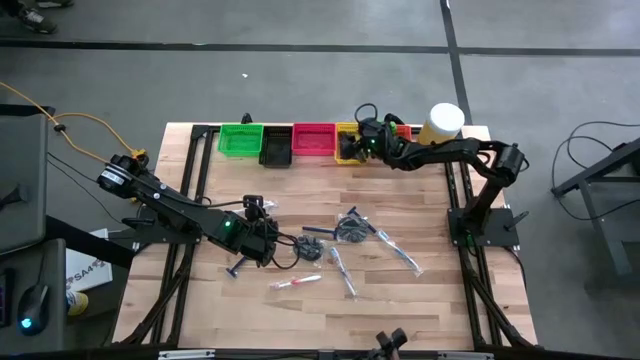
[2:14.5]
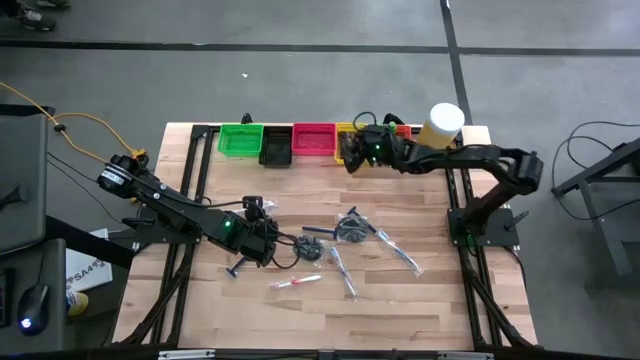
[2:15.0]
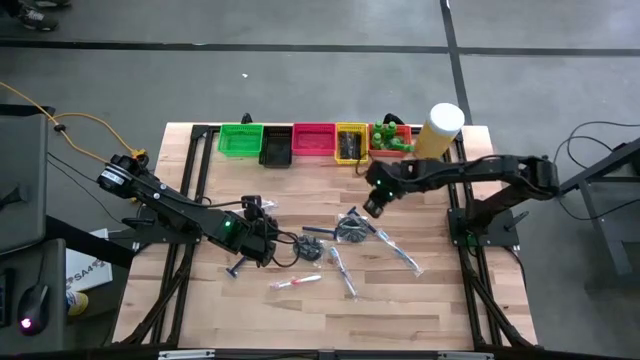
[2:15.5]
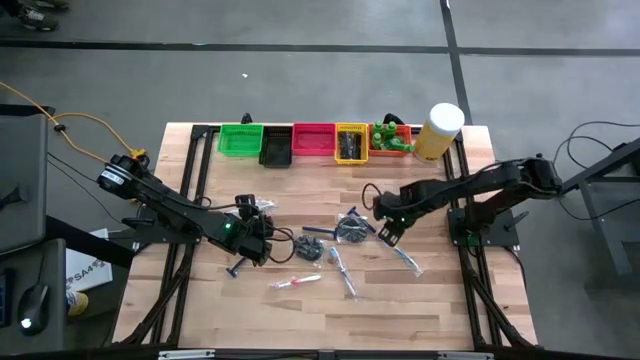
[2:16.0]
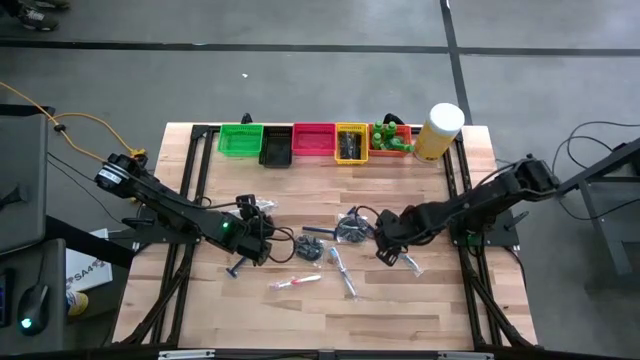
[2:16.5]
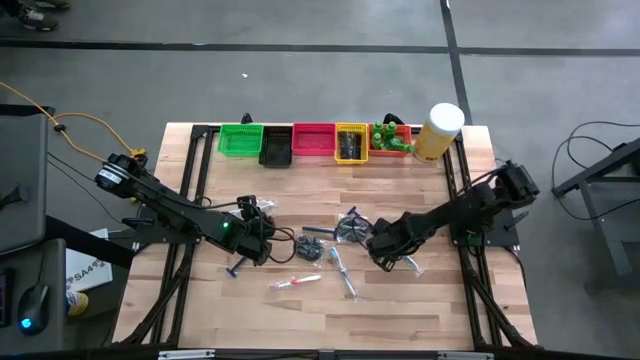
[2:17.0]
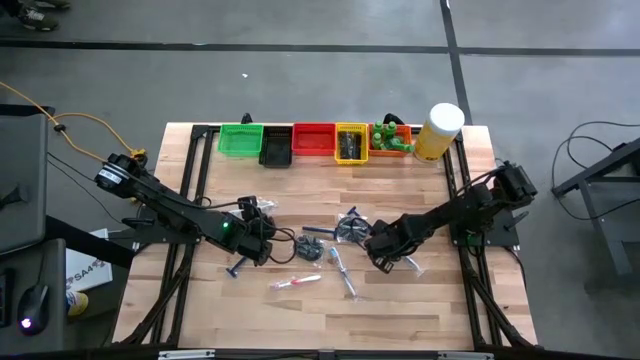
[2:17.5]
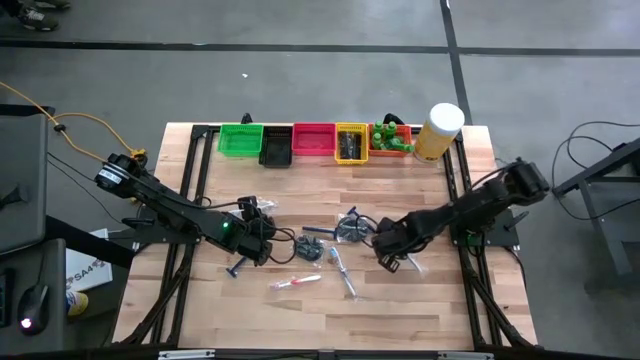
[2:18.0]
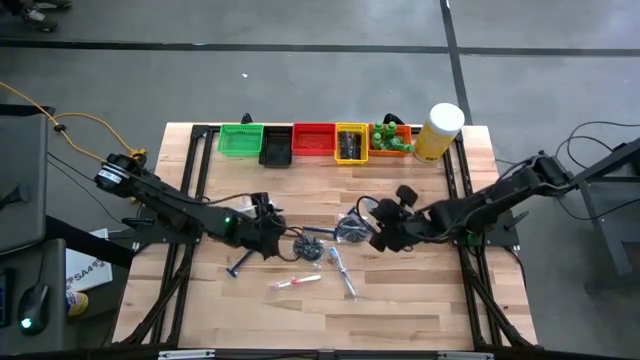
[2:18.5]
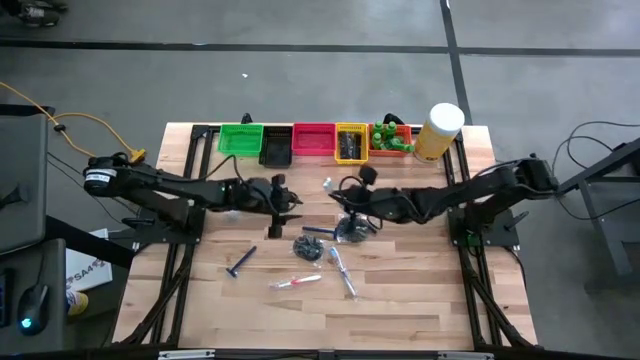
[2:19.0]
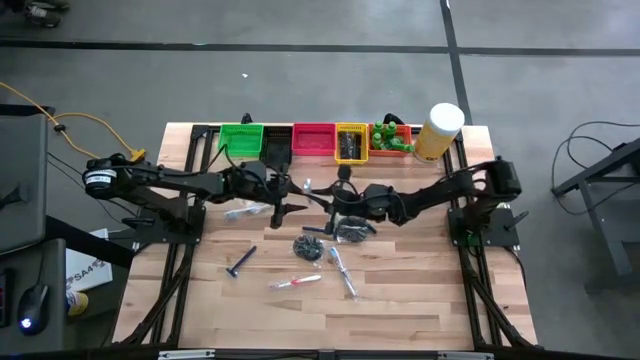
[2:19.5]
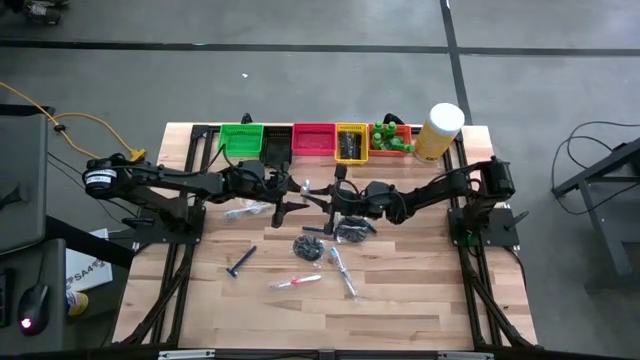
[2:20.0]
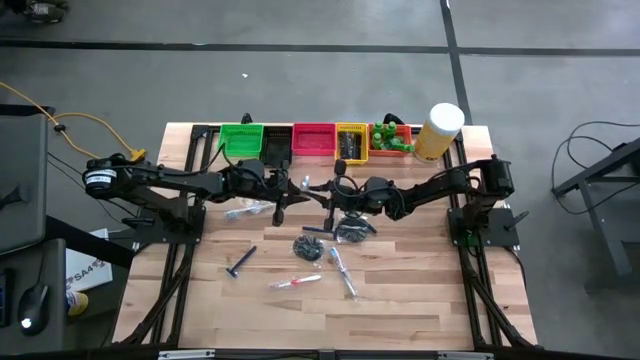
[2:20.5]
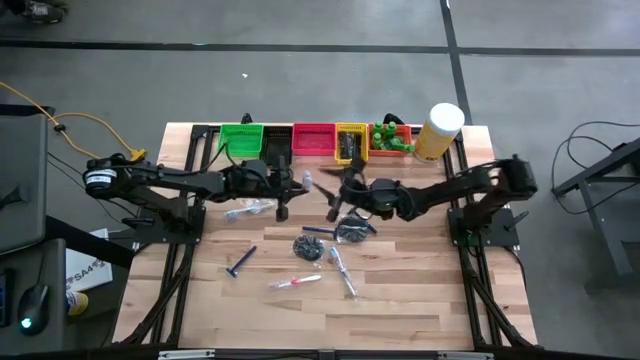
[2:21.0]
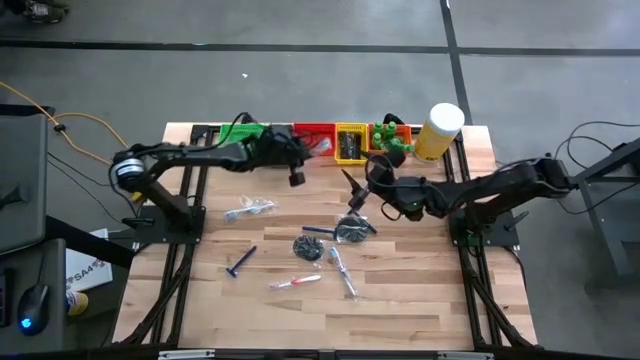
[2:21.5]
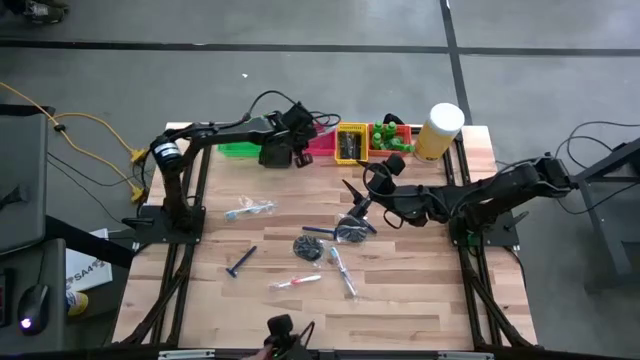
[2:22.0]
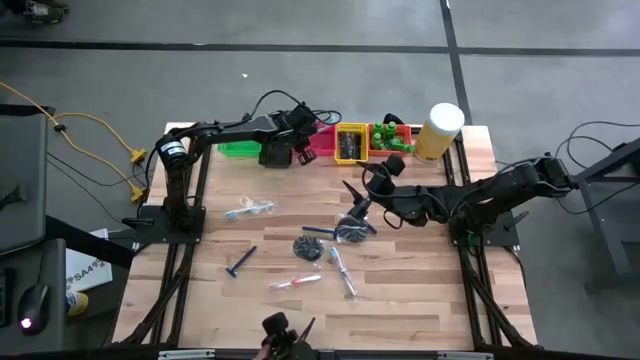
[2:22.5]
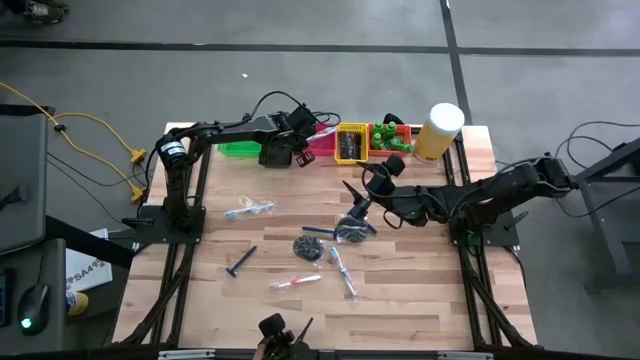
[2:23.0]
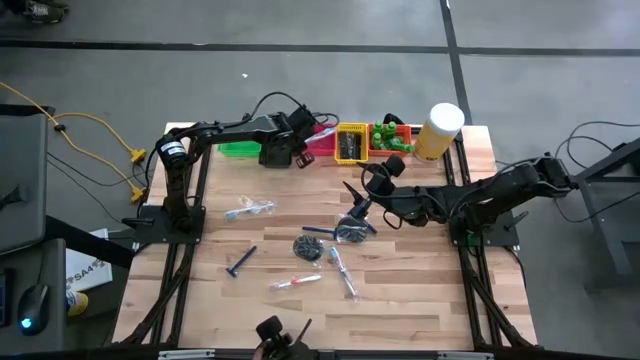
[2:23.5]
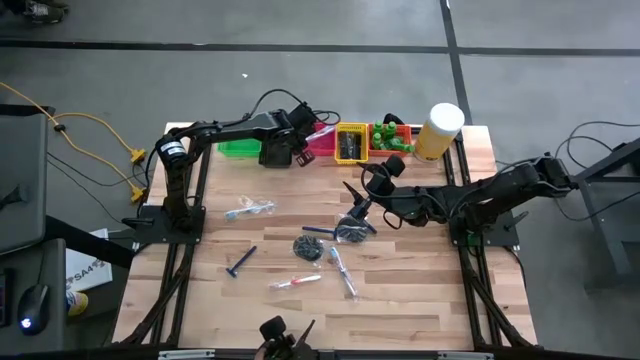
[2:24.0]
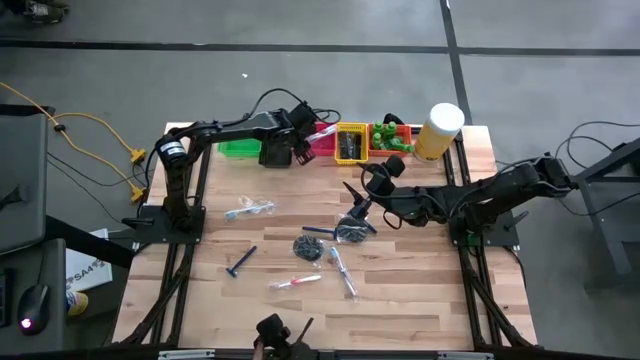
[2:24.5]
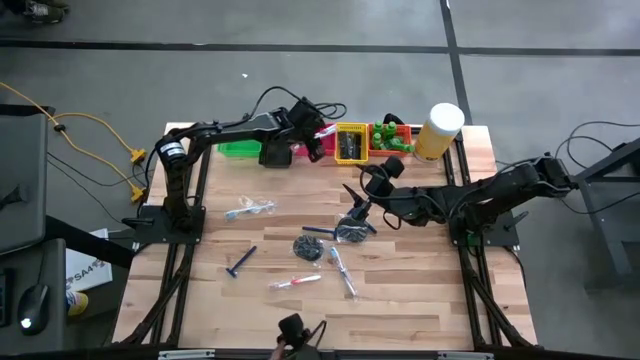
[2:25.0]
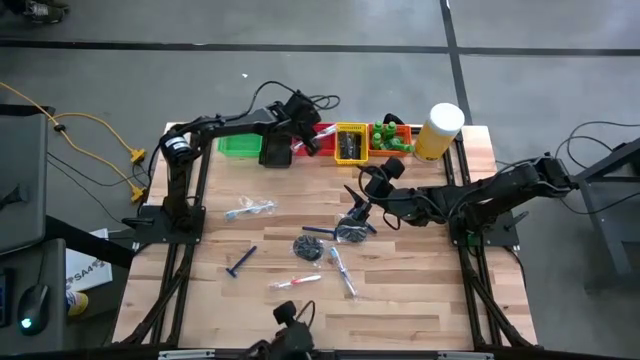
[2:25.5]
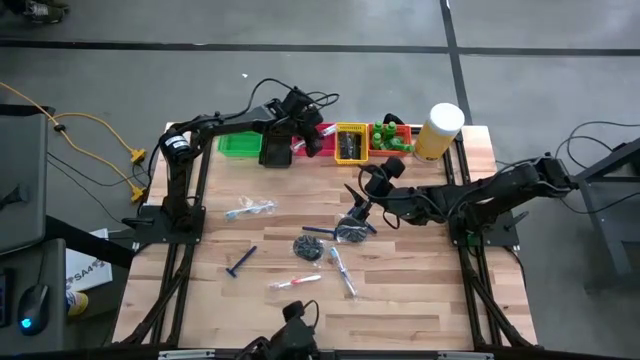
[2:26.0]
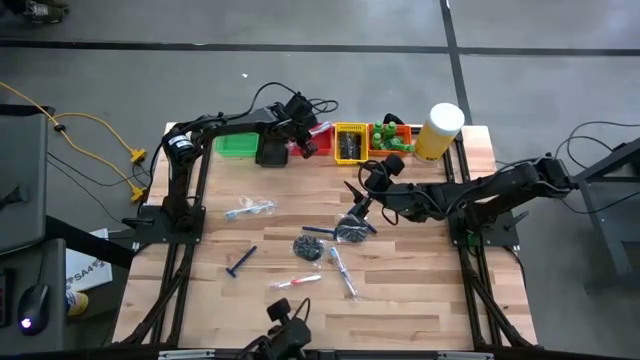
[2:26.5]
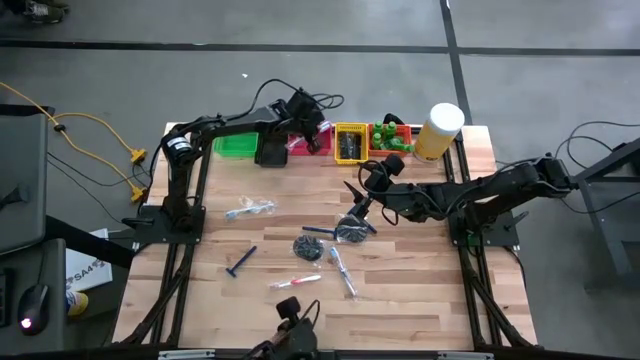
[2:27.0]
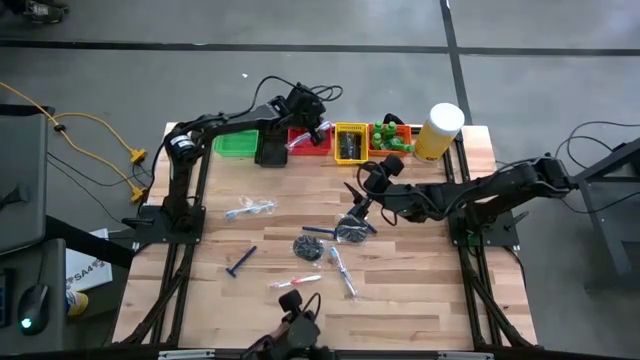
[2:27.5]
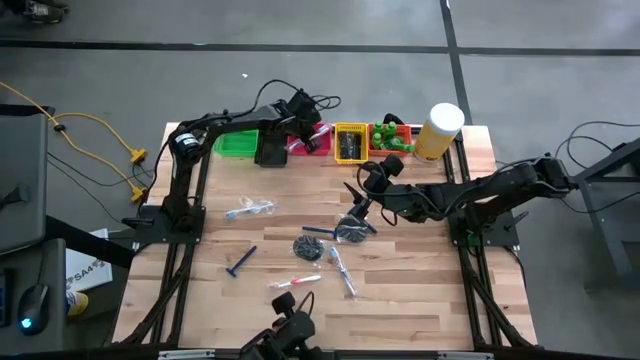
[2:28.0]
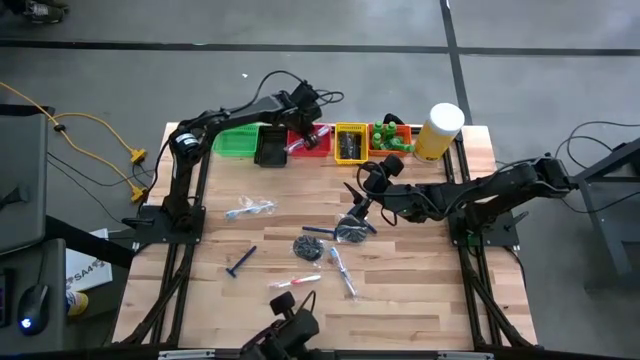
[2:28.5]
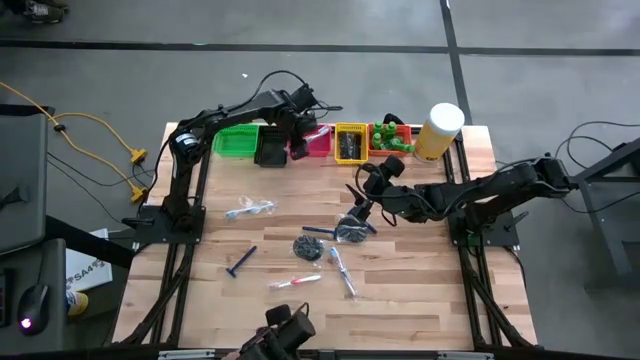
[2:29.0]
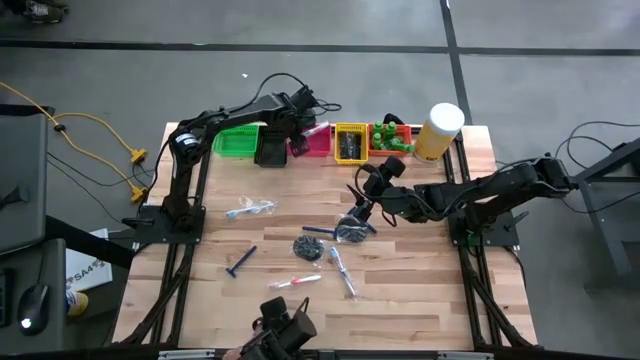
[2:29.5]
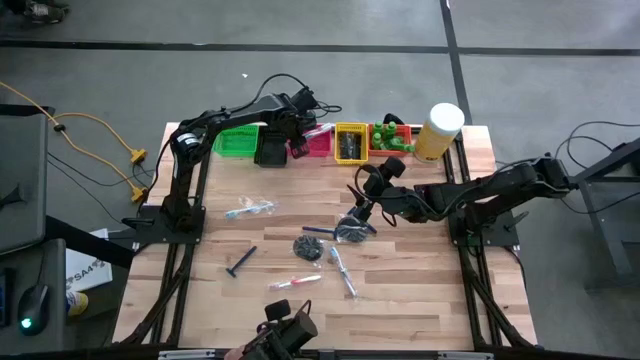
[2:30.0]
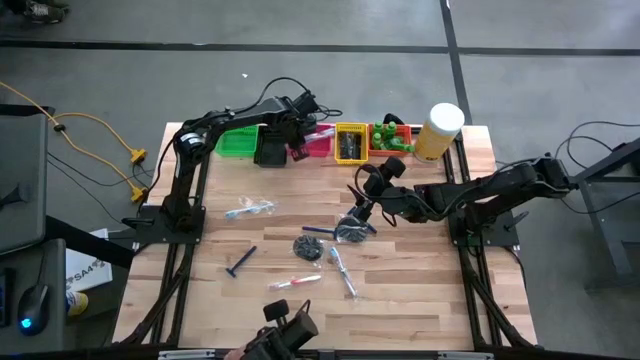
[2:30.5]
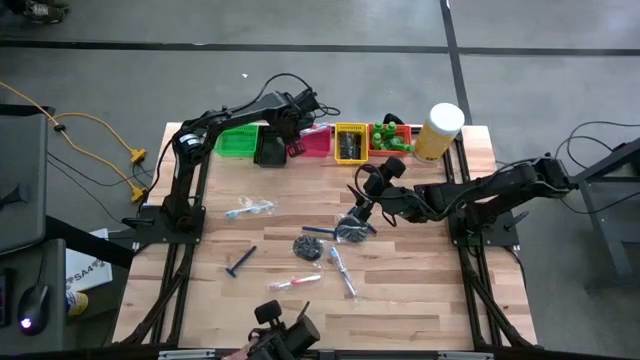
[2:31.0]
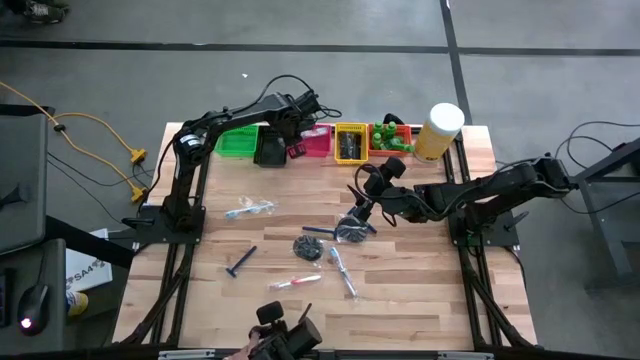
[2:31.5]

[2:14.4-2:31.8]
Task: Pick & Place Travel size toiletries
Put the blue toothbrush into the red basket

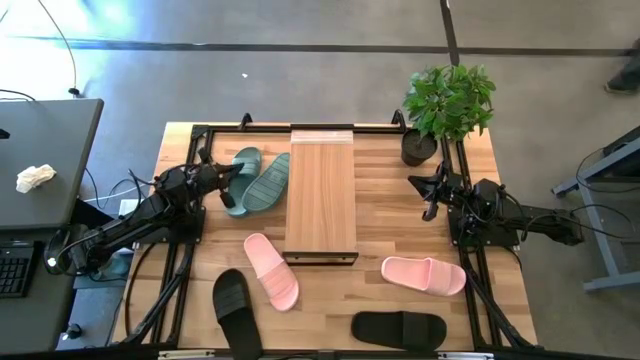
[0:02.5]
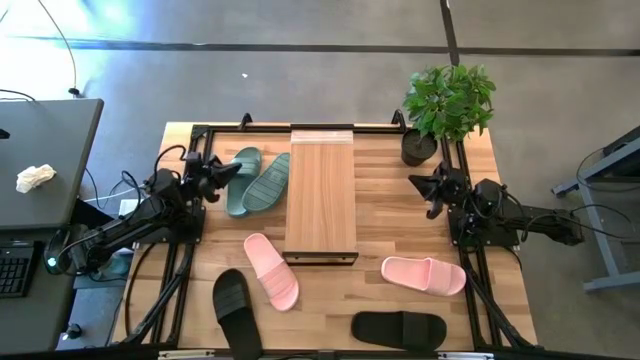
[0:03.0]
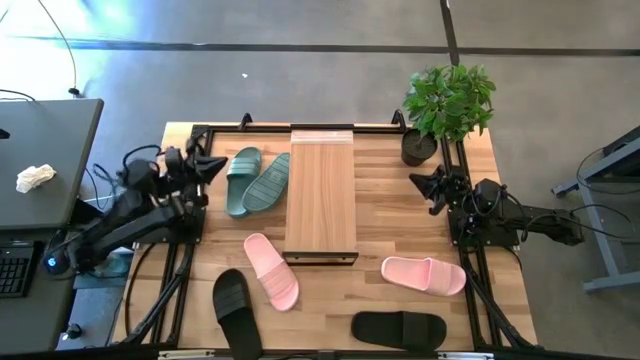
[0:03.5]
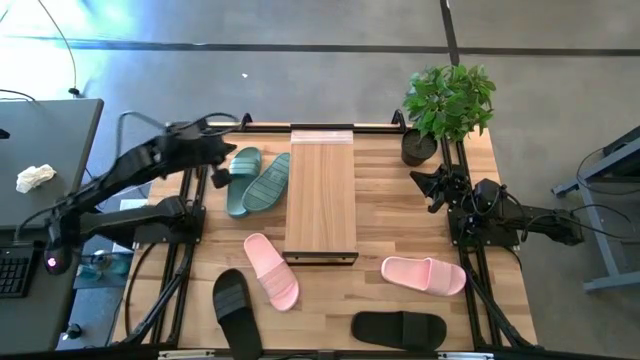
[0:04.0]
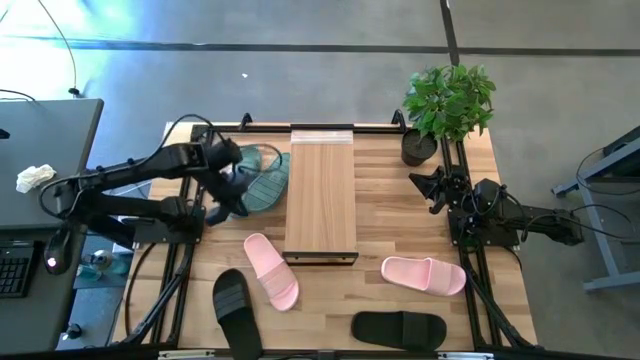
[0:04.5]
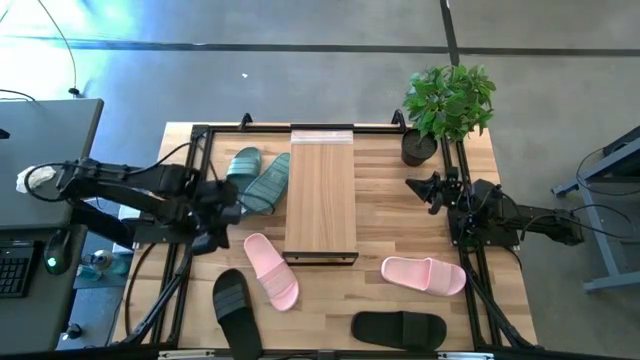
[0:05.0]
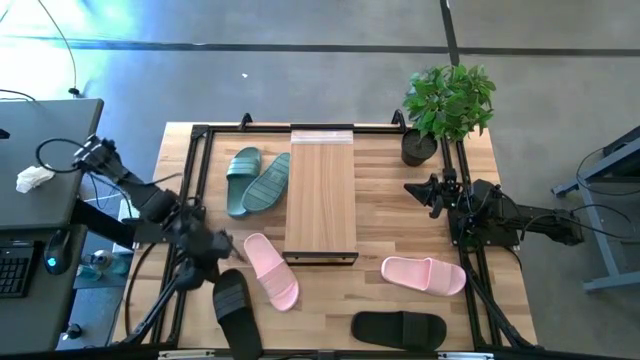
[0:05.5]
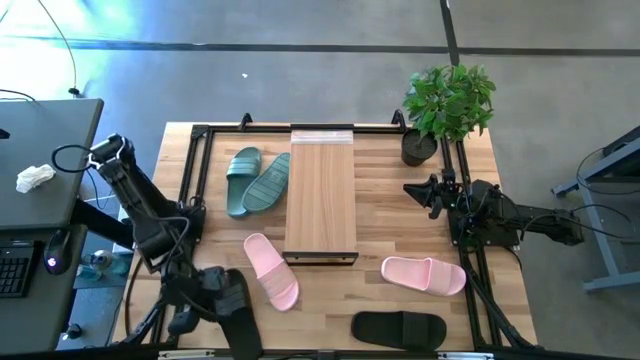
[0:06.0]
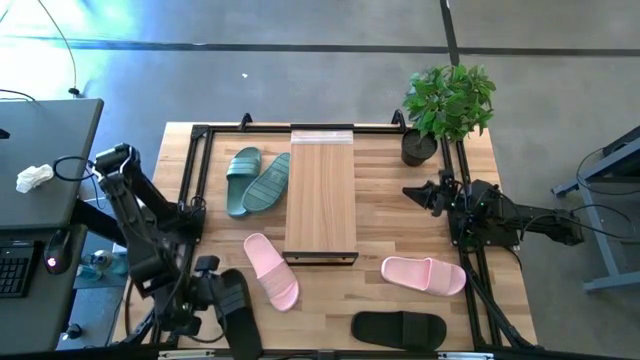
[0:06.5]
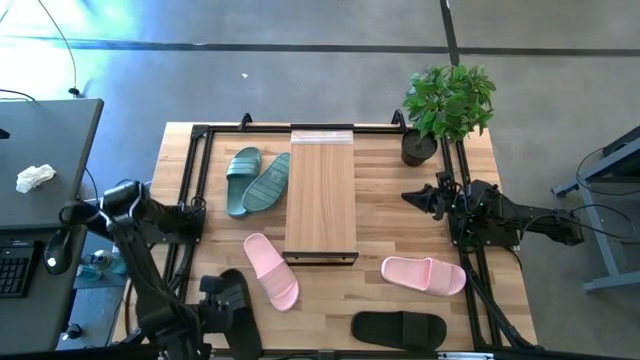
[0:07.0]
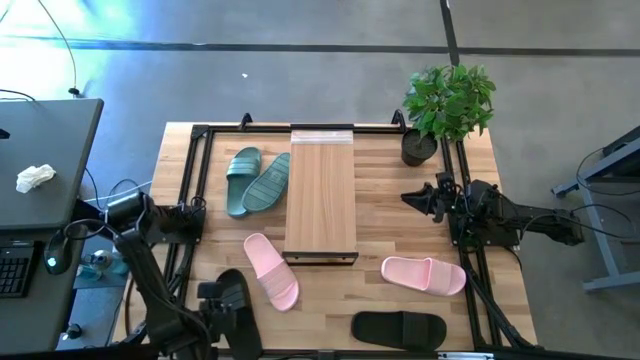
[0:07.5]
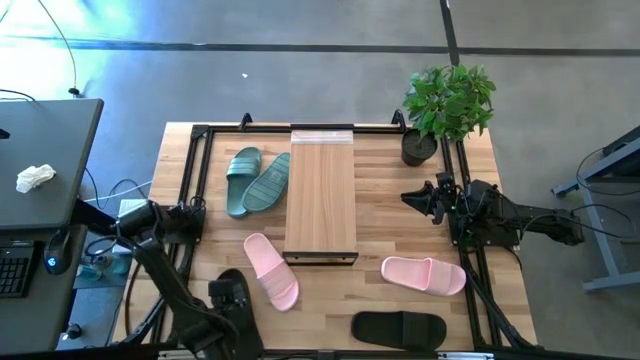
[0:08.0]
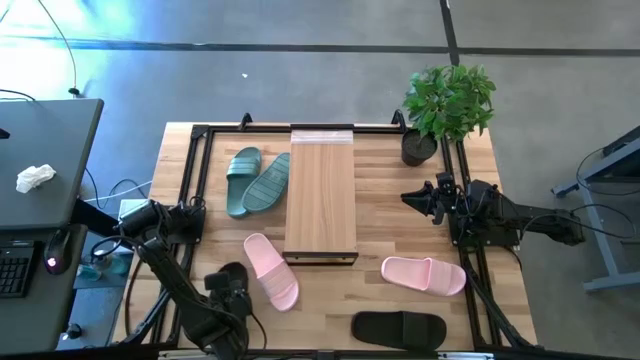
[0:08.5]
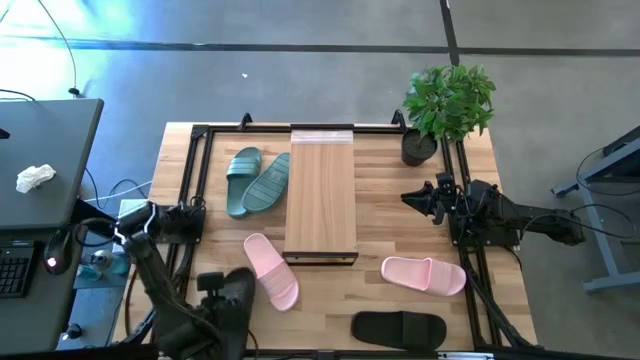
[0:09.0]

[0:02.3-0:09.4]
Task: Pick and place slides into the shelf
Put the left black slide on the shelf
